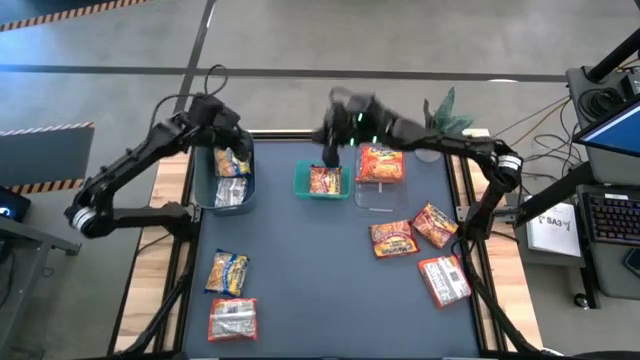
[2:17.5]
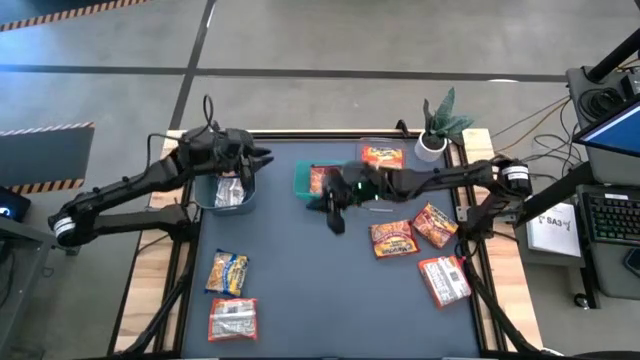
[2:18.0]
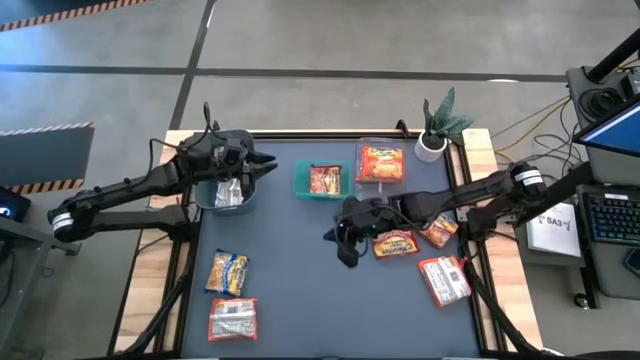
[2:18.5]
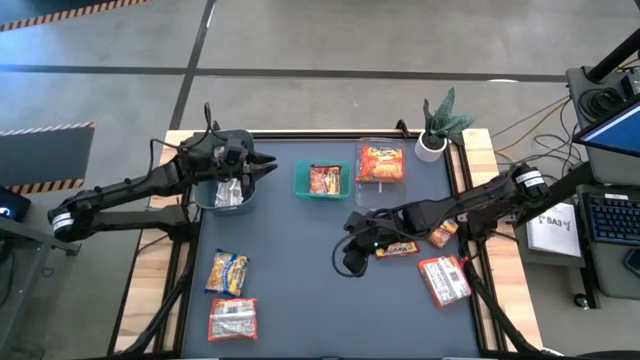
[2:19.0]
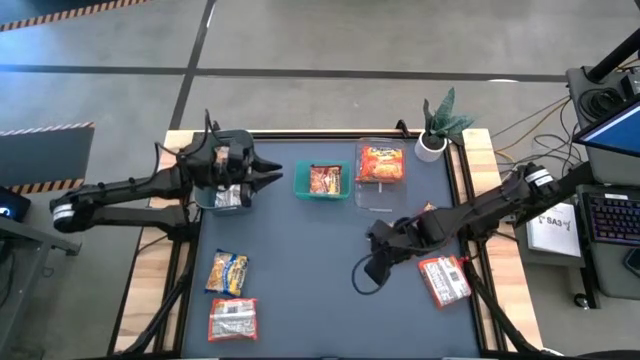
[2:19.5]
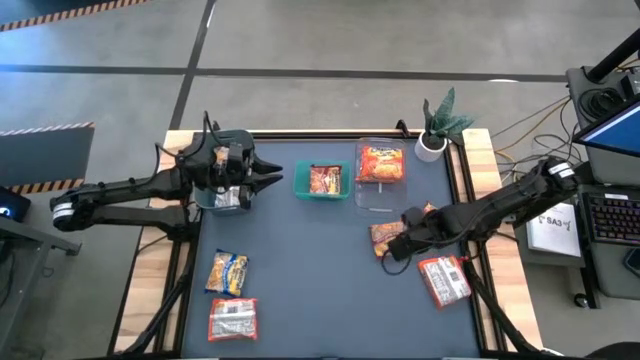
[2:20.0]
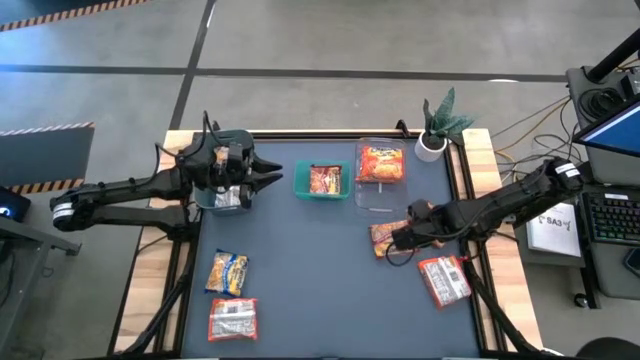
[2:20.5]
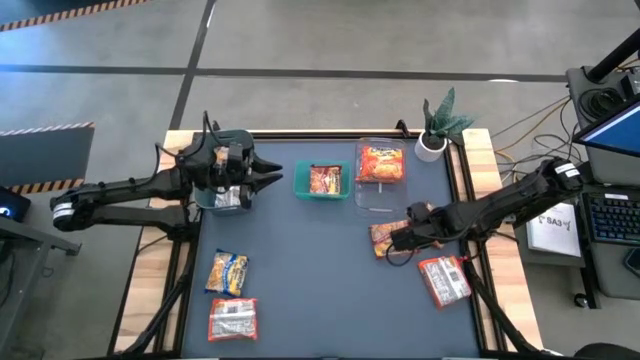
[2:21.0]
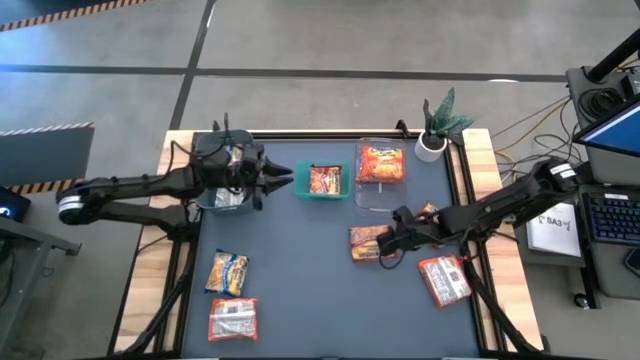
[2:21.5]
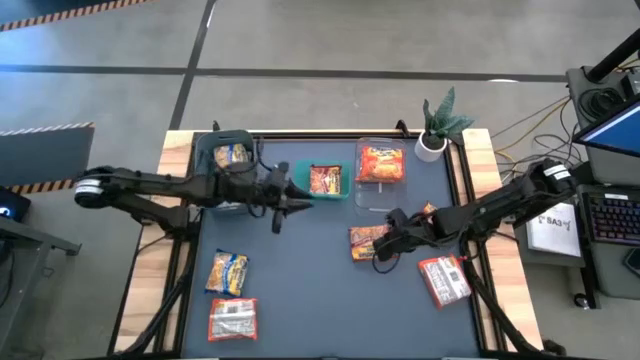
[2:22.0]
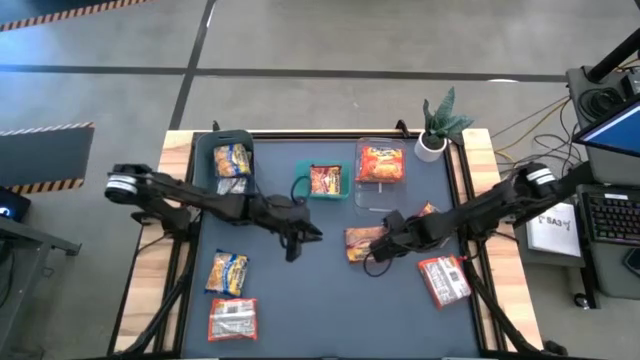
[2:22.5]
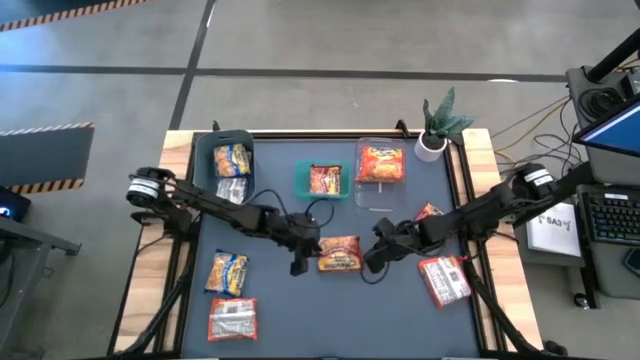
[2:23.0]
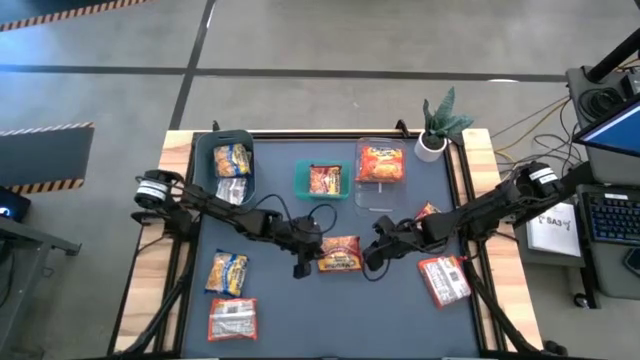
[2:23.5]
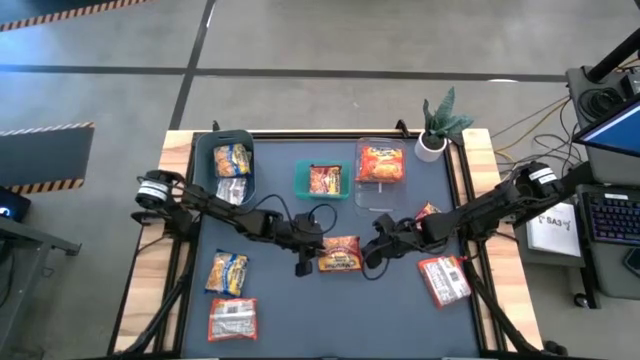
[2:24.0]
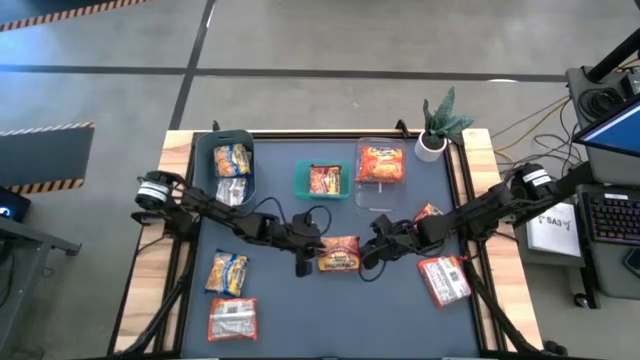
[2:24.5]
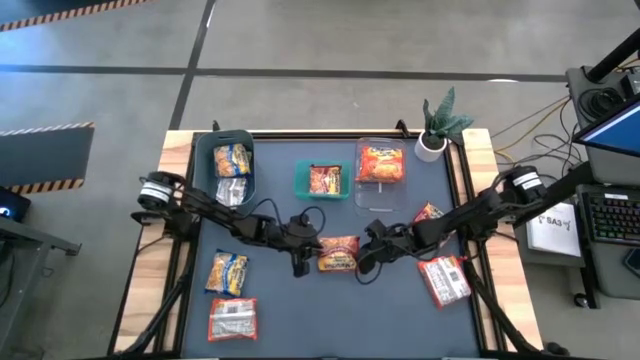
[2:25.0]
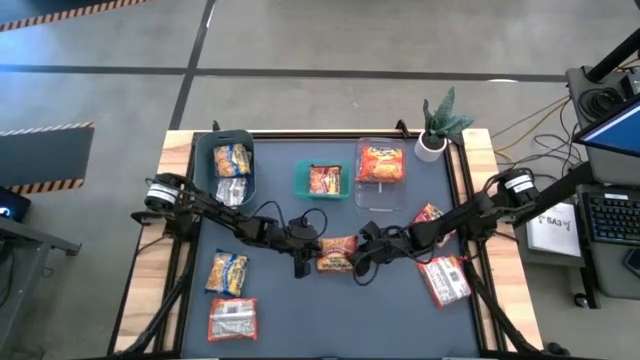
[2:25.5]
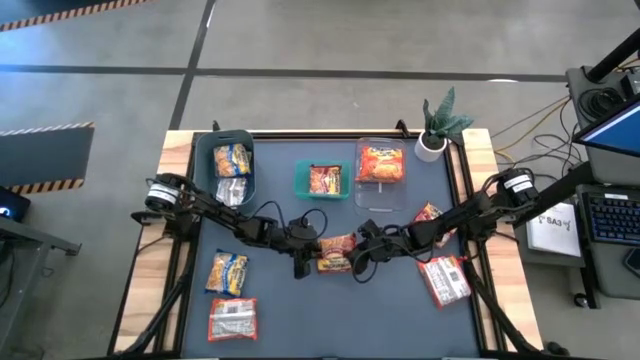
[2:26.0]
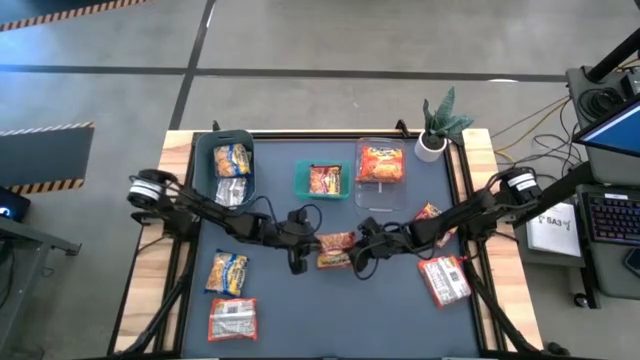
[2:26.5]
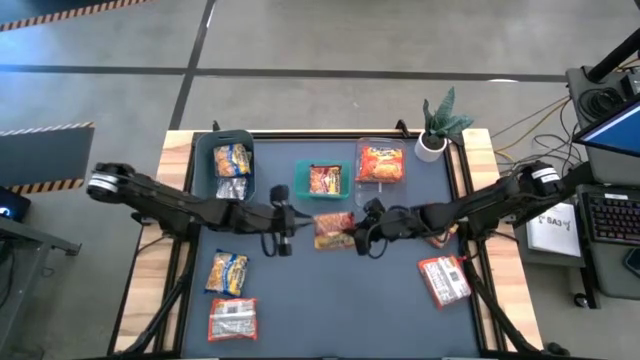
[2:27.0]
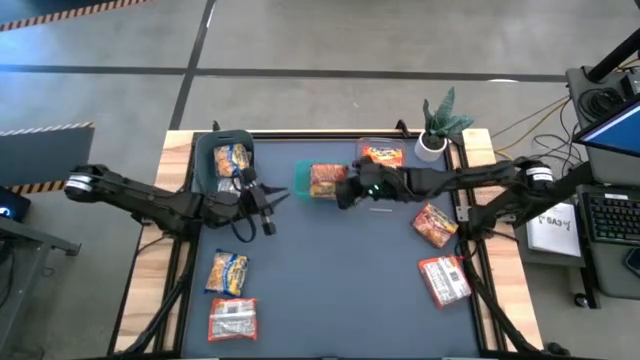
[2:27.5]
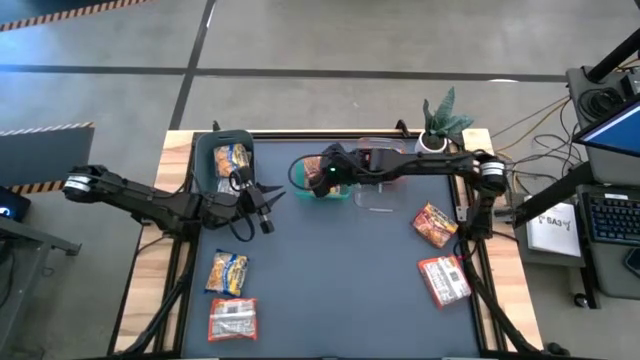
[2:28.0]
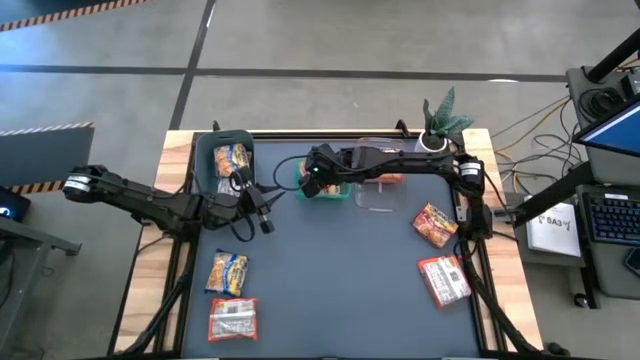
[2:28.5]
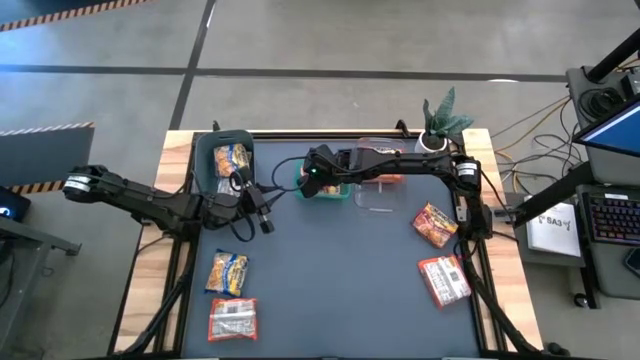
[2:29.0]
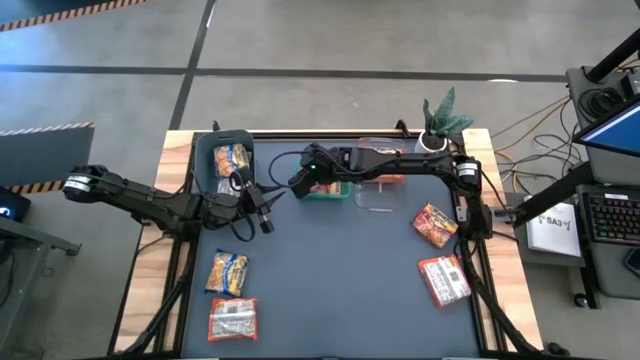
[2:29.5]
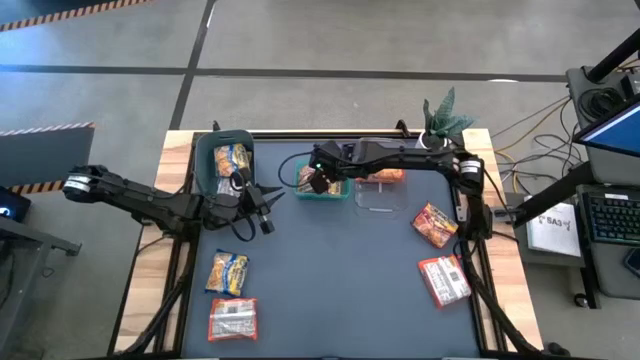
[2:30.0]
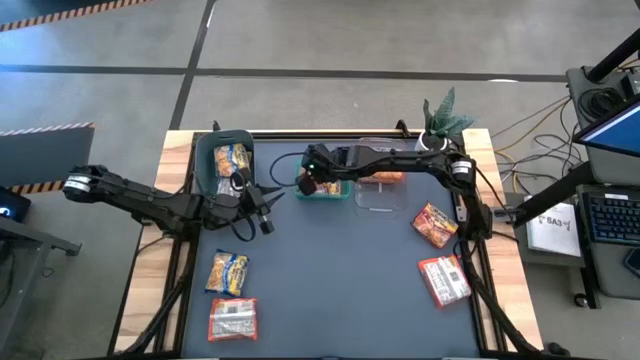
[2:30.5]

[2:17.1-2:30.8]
Task: Sort Maruchan noodles
Put the left red noodle pack into the light blue bin

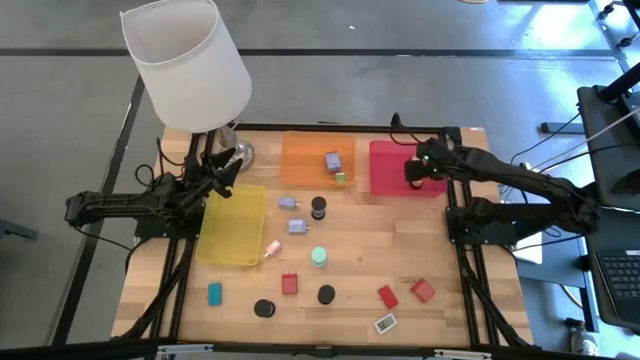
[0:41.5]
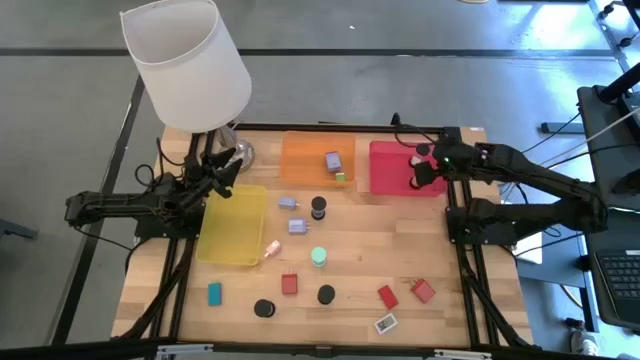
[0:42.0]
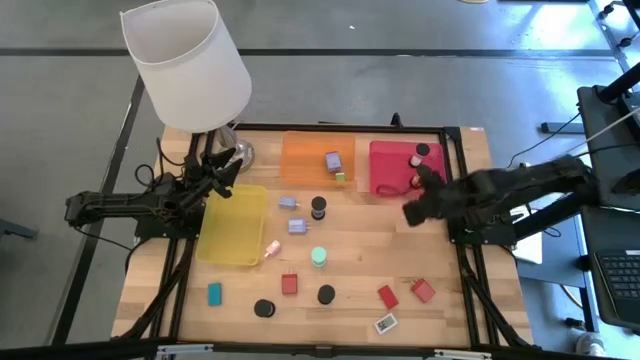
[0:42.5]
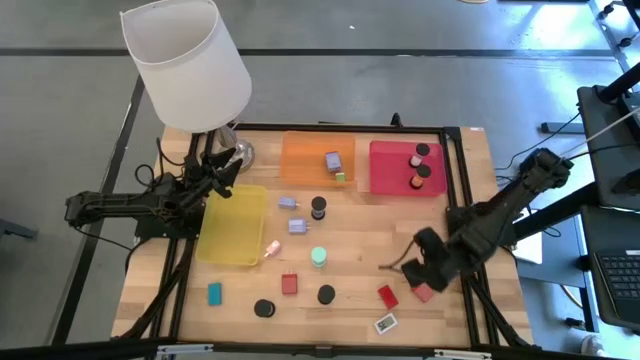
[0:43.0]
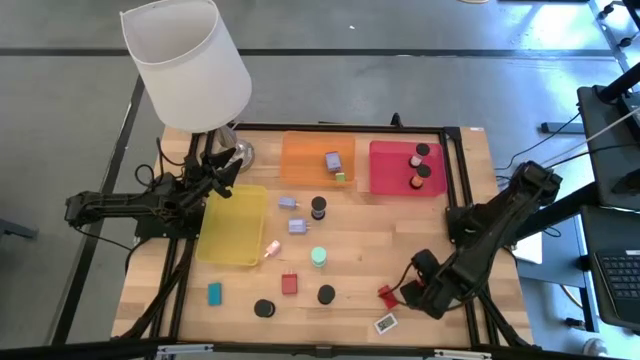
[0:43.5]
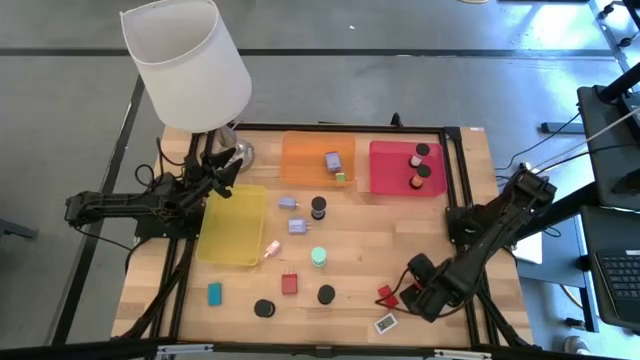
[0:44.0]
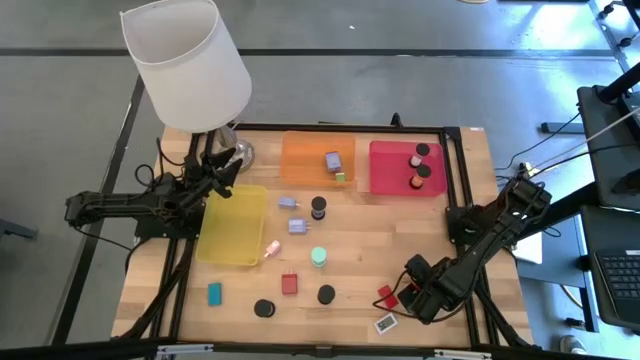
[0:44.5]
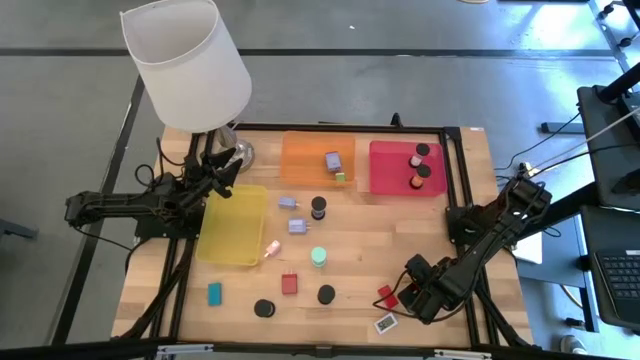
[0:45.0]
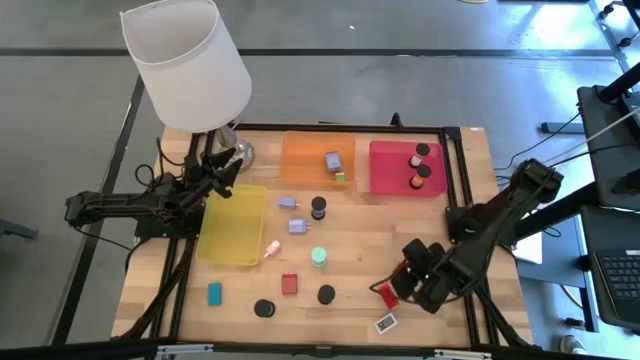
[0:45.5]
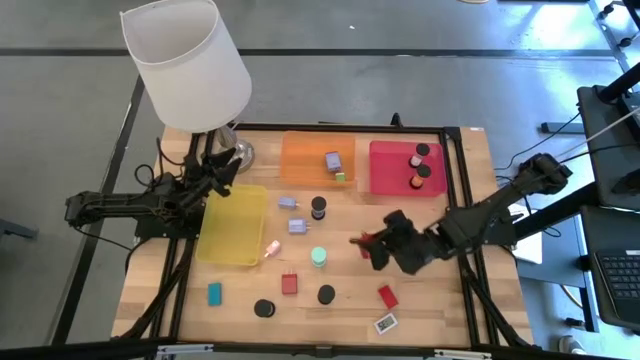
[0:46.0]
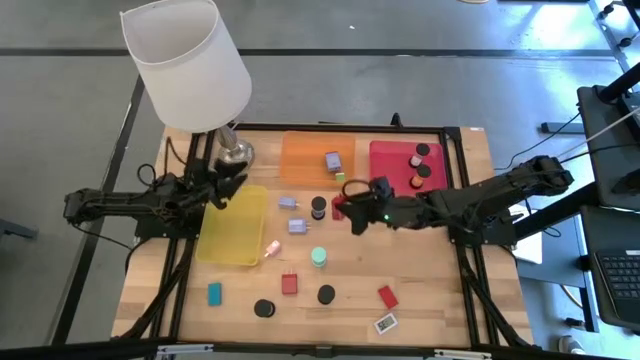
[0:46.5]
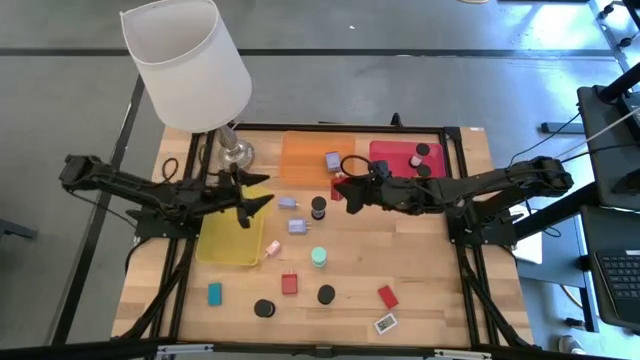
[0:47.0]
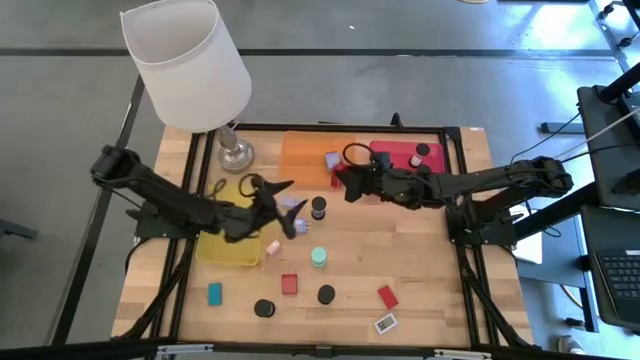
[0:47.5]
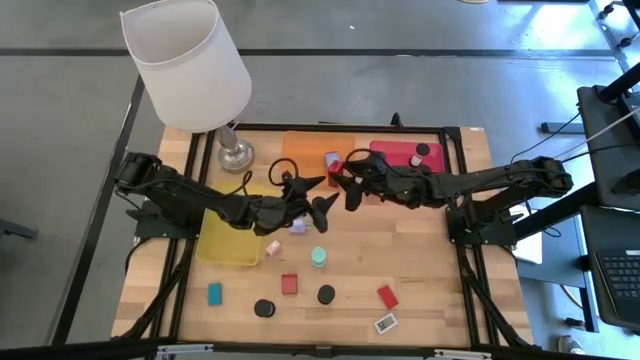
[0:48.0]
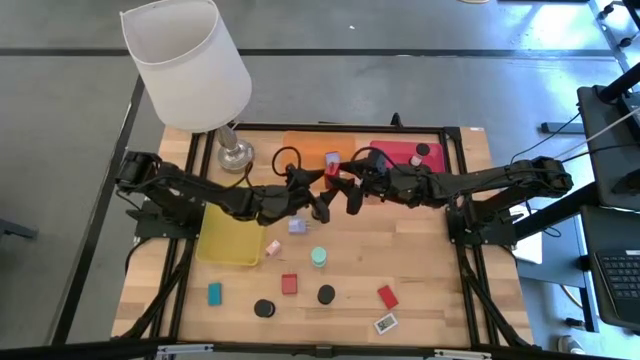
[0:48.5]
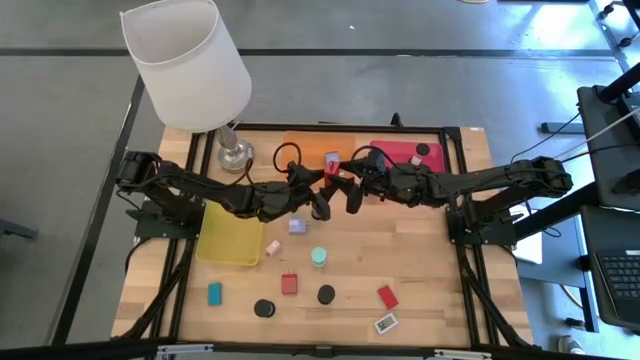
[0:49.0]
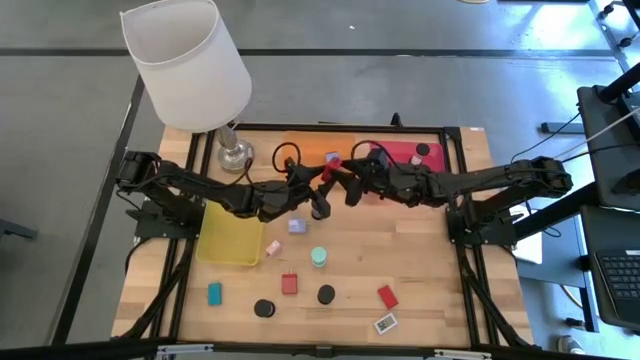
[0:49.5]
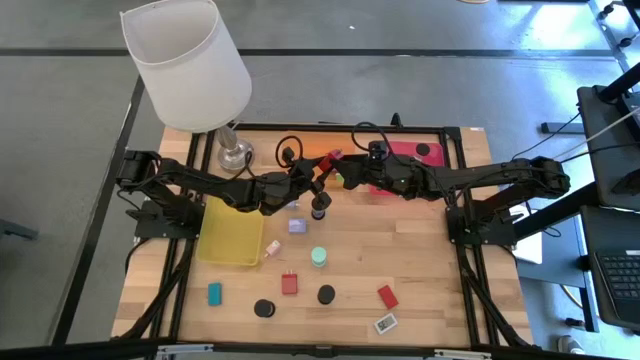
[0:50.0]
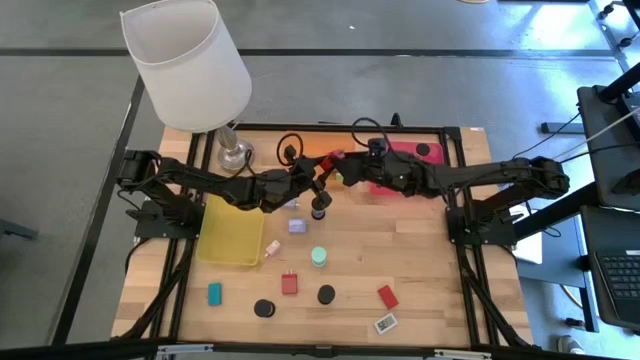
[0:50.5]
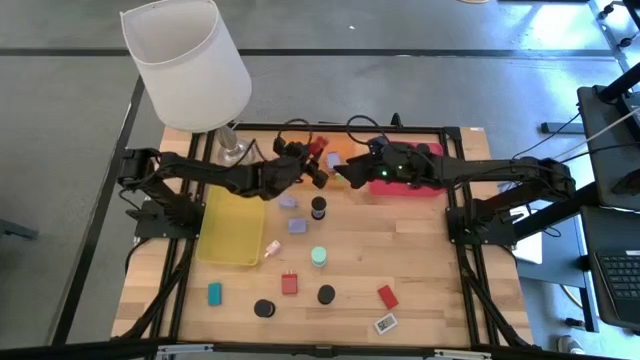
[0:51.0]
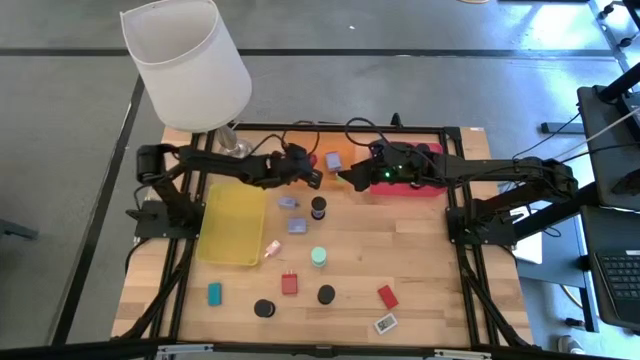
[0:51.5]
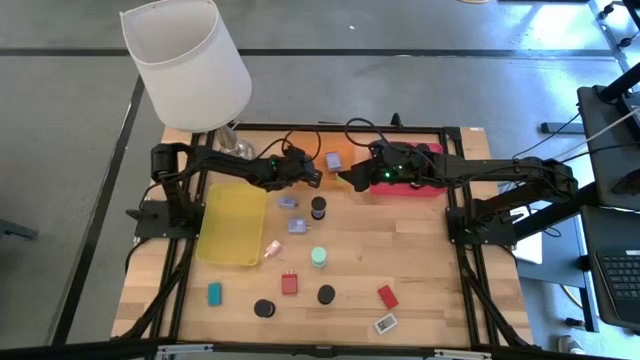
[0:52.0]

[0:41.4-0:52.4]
Task: Pick & Place Office items
Put the right red charger adapter into the orange bin
